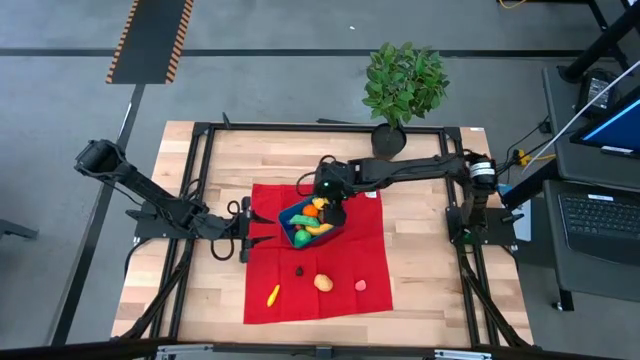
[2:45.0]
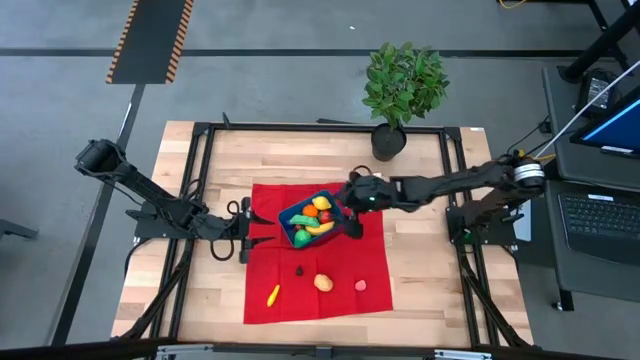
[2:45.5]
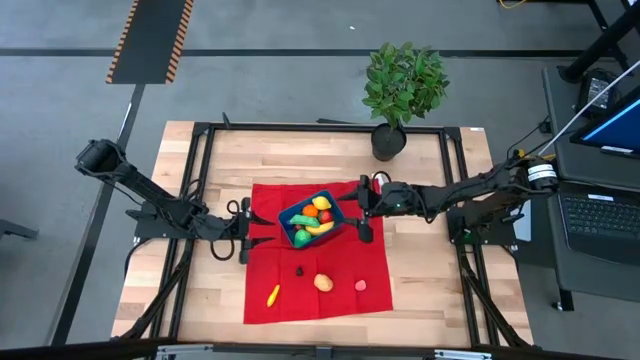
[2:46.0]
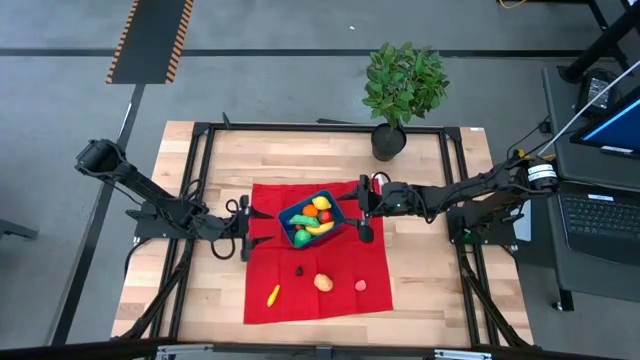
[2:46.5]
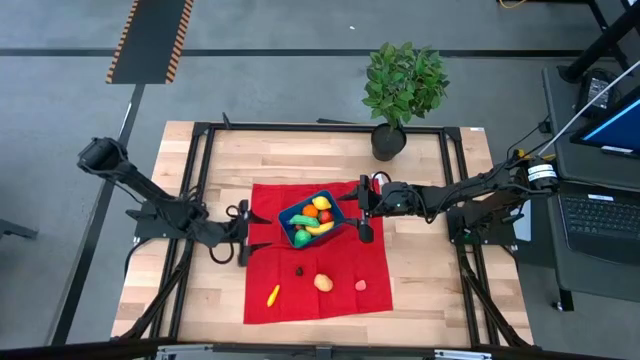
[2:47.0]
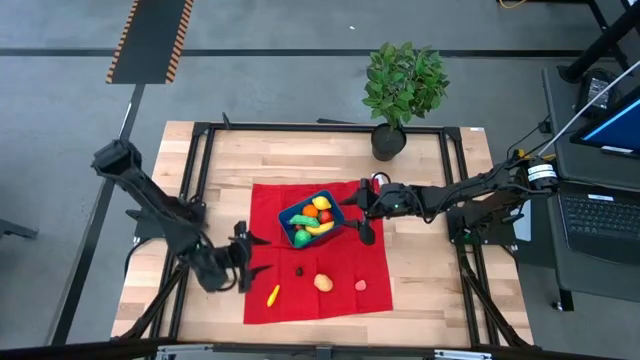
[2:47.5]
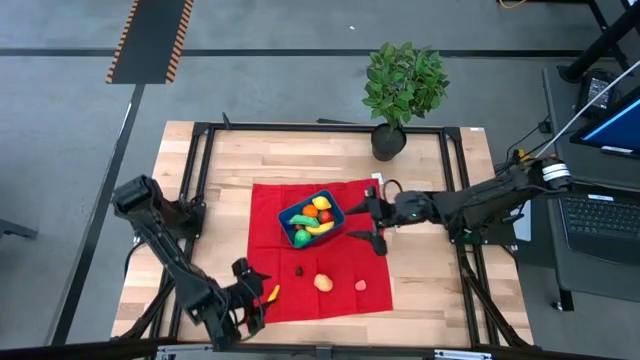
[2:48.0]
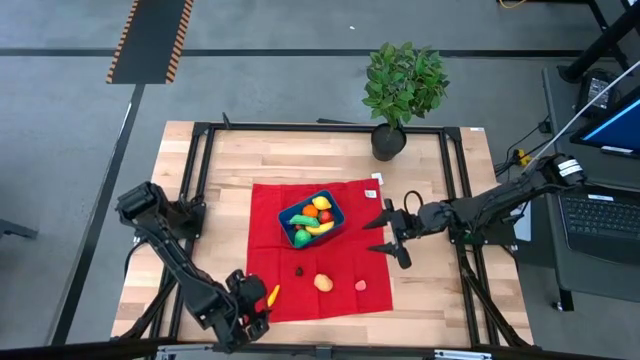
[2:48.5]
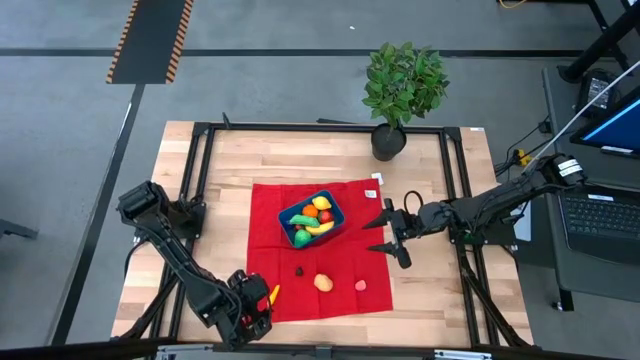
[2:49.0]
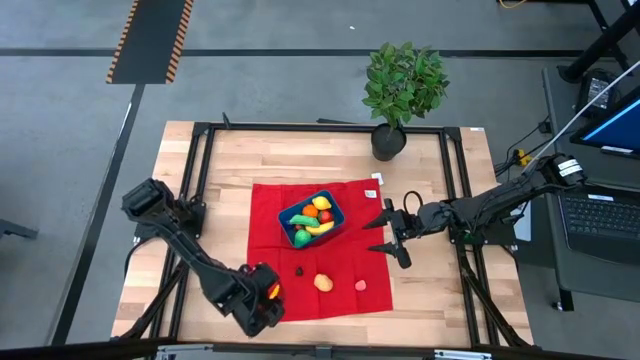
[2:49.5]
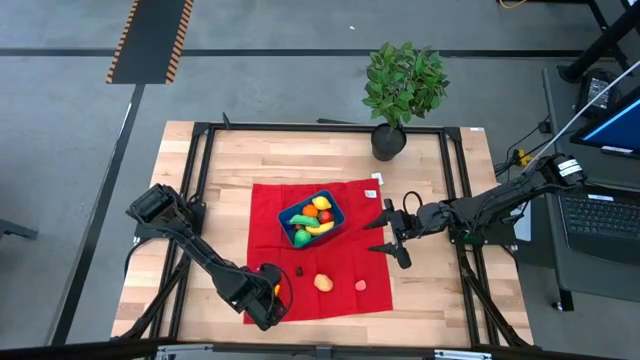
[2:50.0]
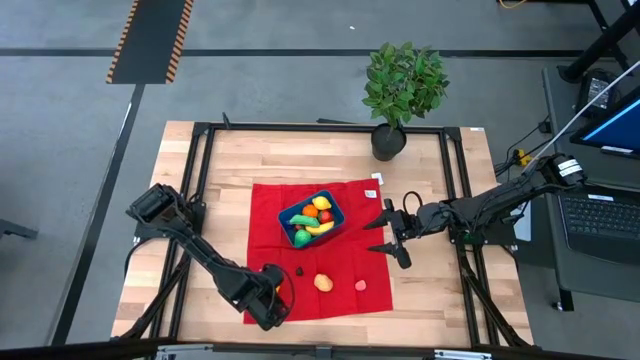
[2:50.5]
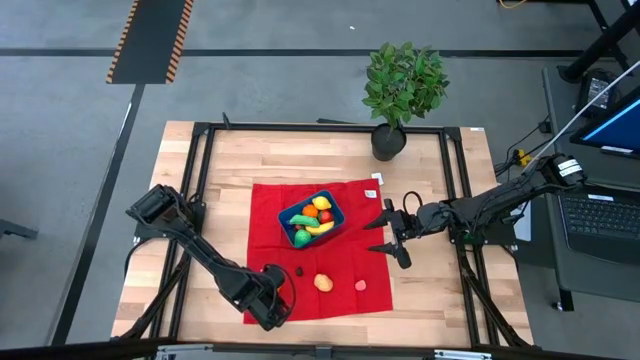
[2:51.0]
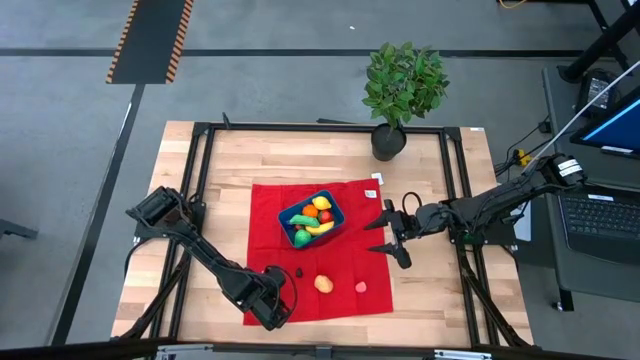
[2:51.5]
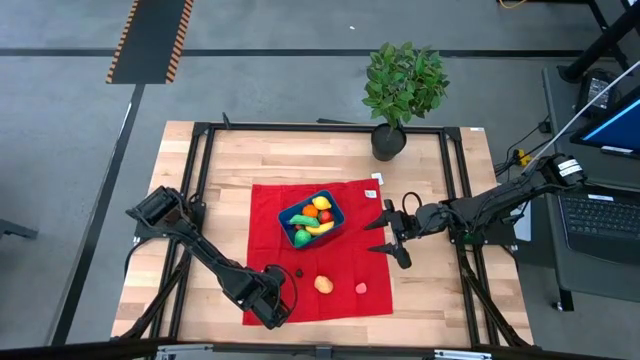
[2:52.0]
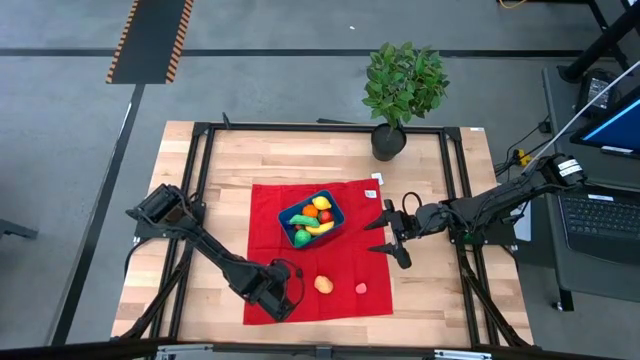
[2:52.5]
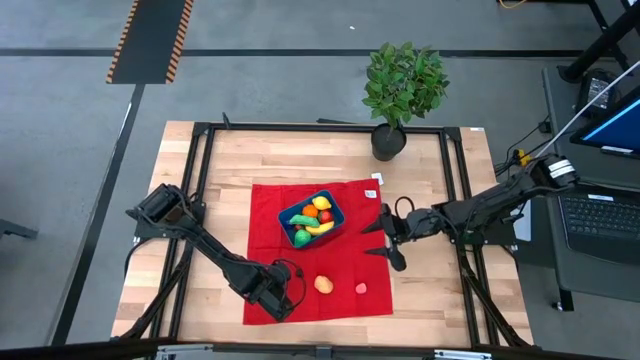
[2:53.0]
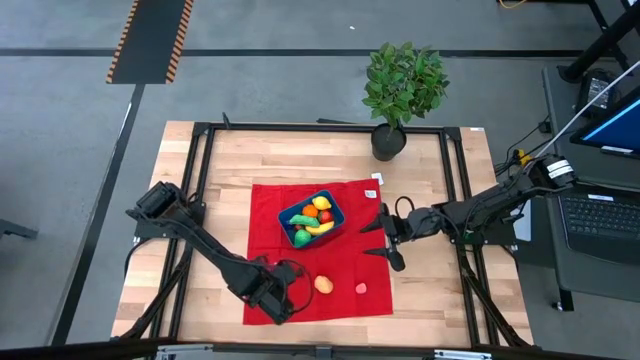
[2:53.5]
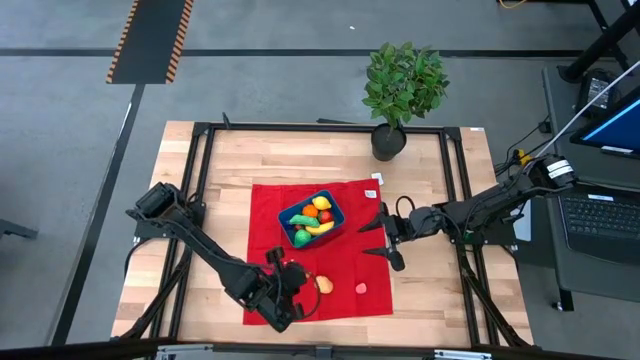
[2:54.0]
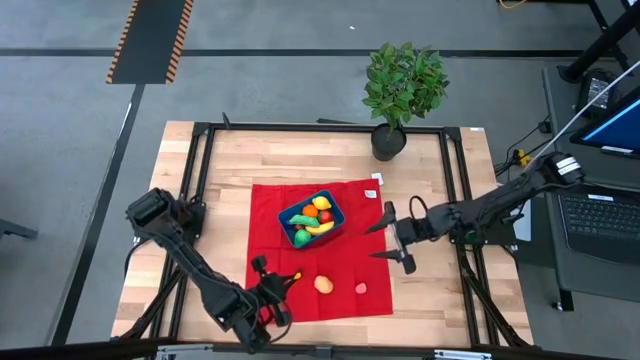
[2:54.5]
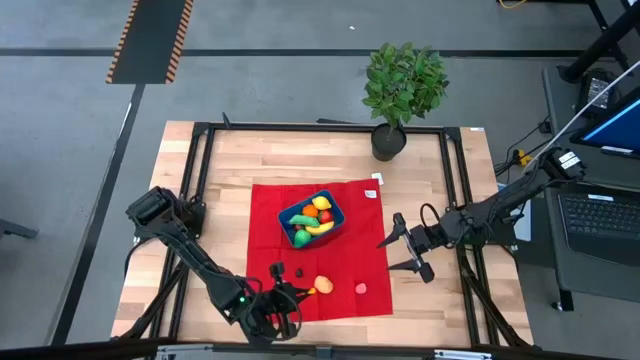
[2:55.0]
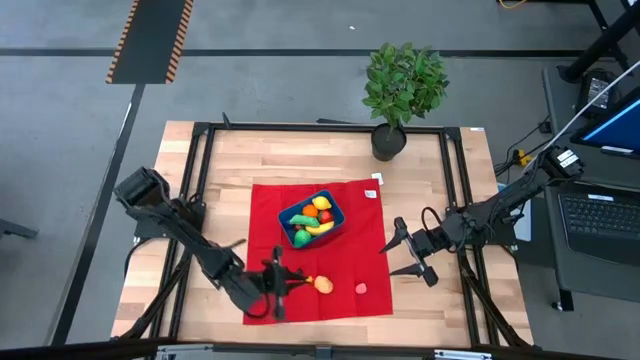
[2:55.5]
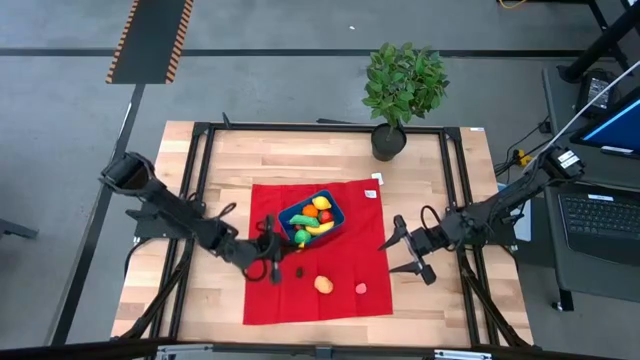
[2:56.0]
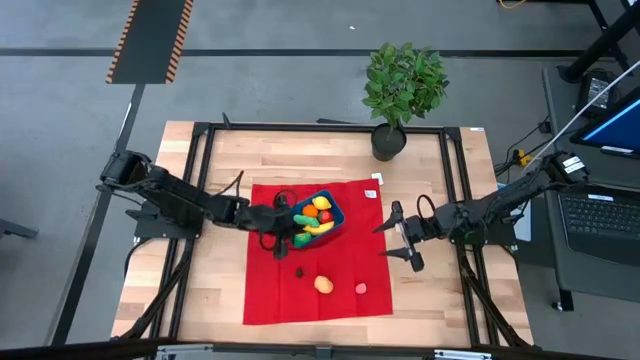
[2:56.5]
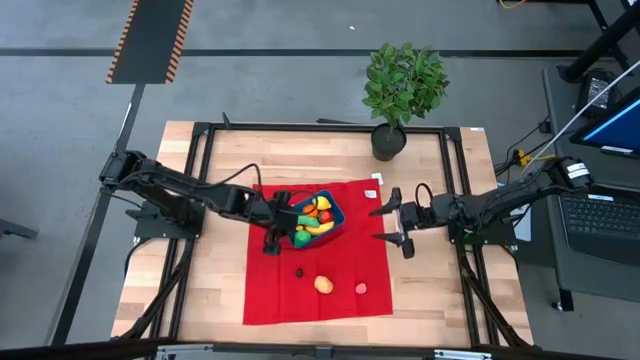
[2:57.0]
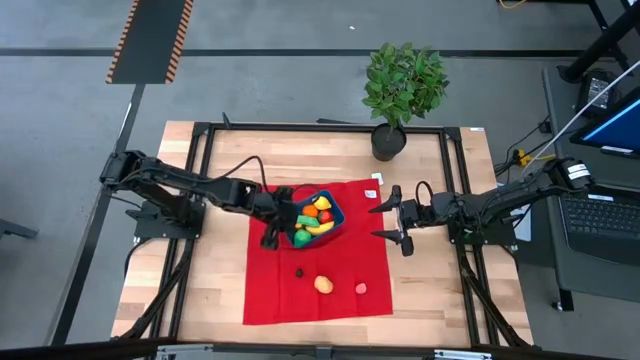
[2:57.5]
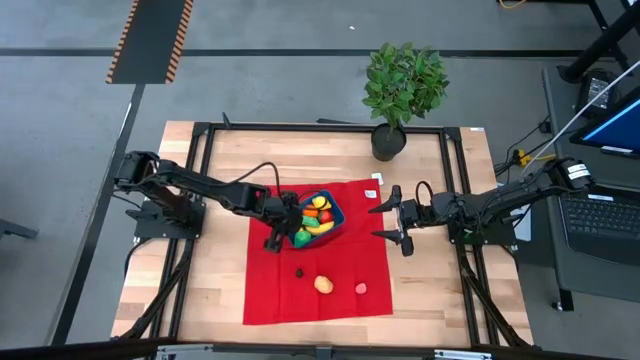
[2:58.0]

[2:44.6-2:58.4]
Task: Pick and placing Produce into tupperware
Put the corn into the blue bin

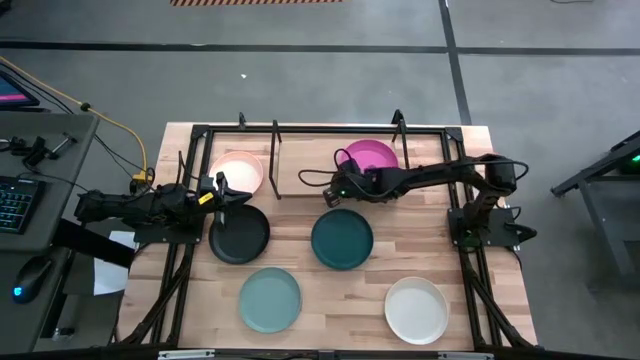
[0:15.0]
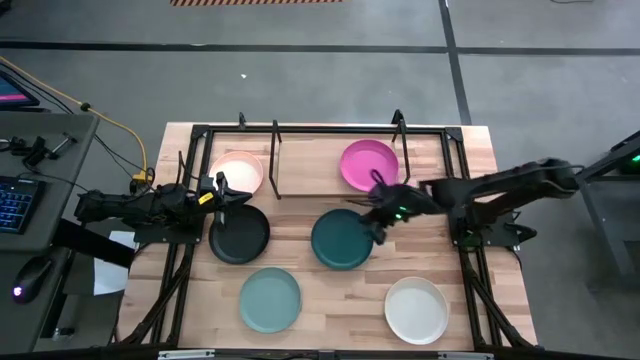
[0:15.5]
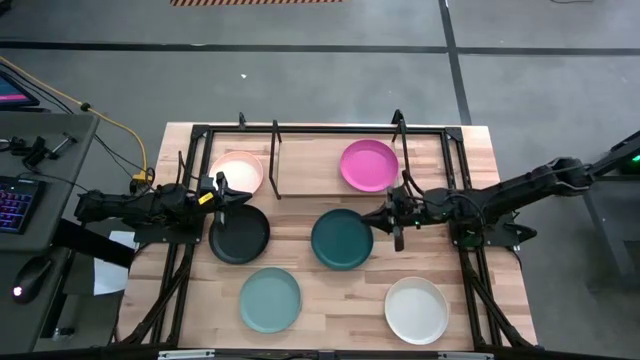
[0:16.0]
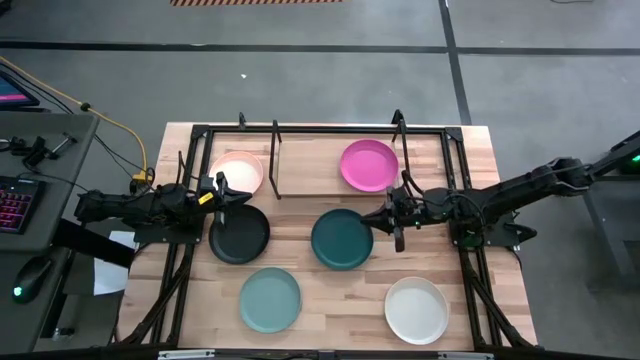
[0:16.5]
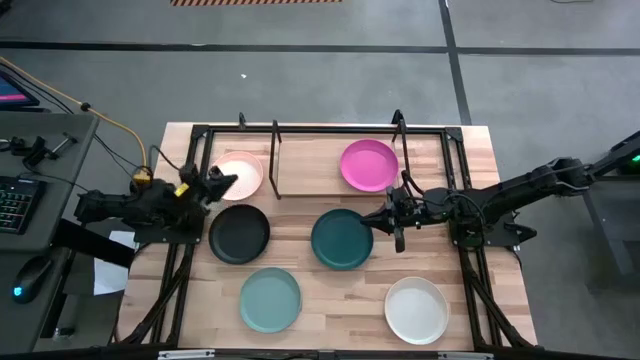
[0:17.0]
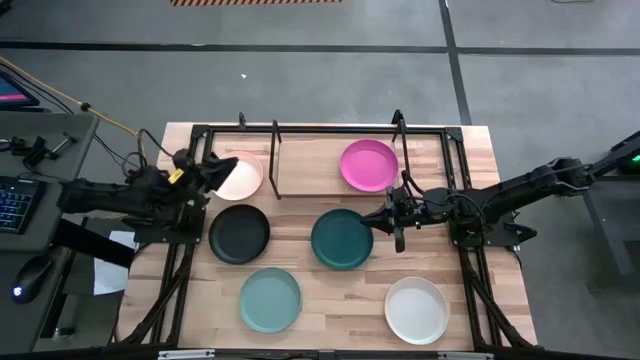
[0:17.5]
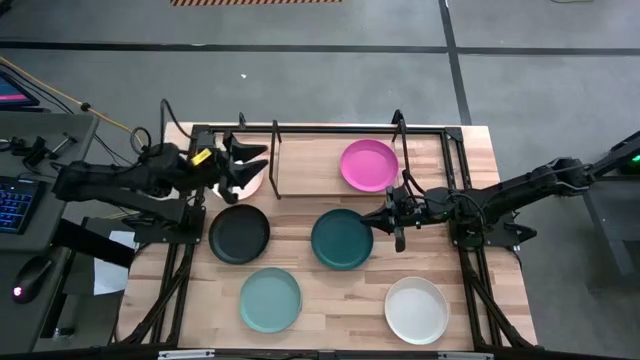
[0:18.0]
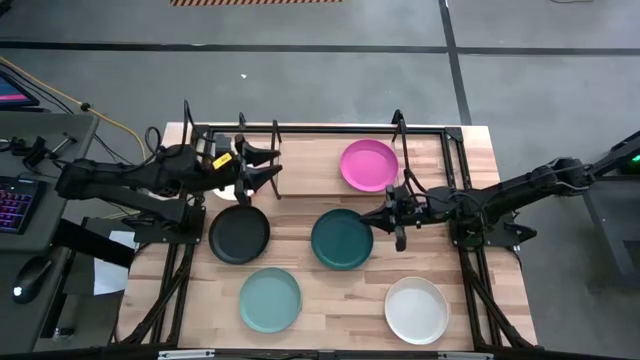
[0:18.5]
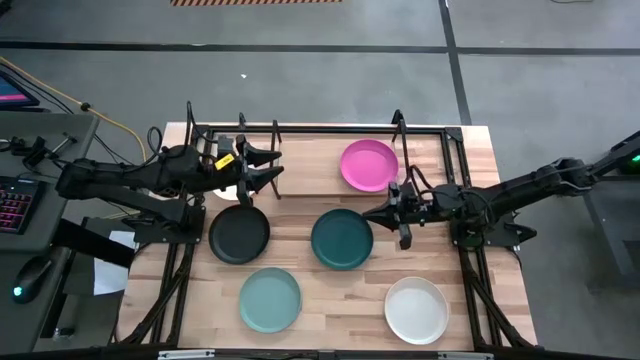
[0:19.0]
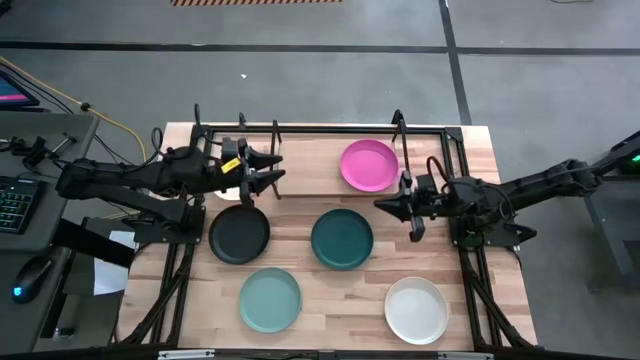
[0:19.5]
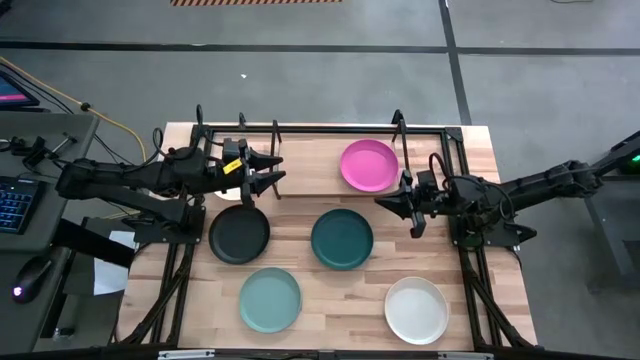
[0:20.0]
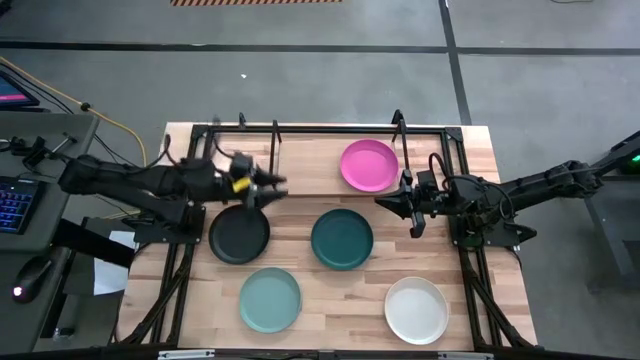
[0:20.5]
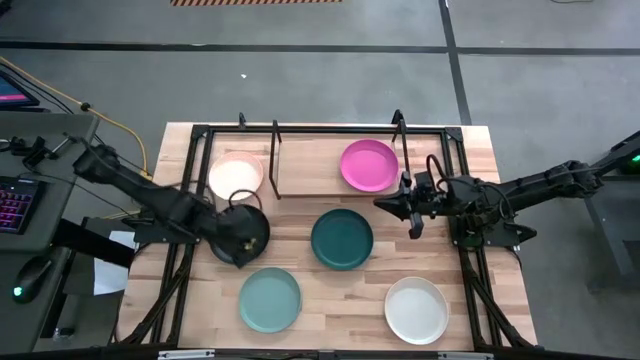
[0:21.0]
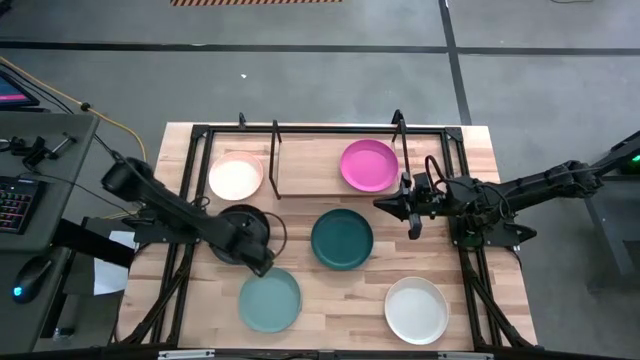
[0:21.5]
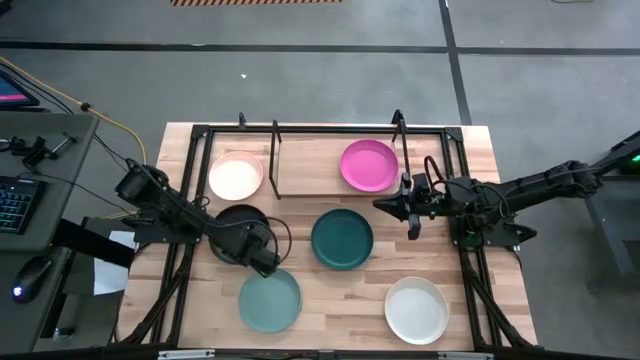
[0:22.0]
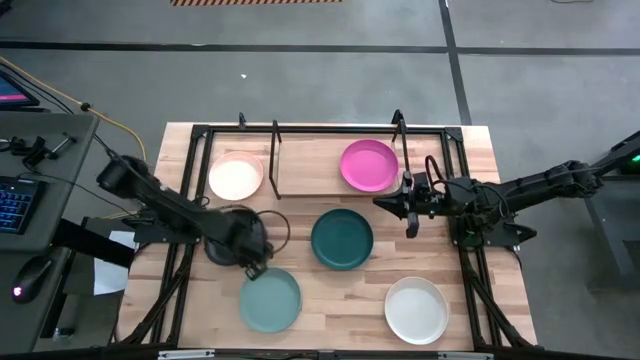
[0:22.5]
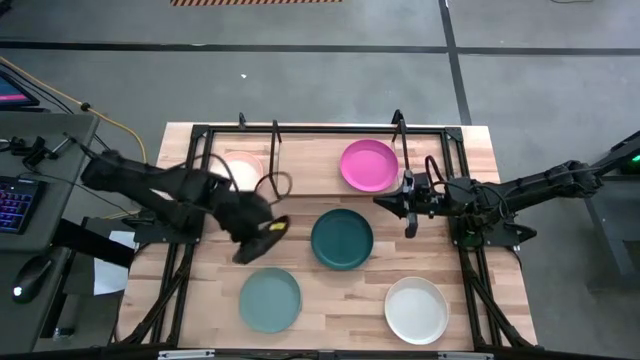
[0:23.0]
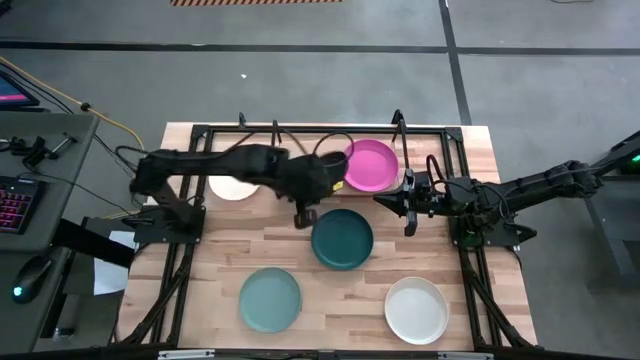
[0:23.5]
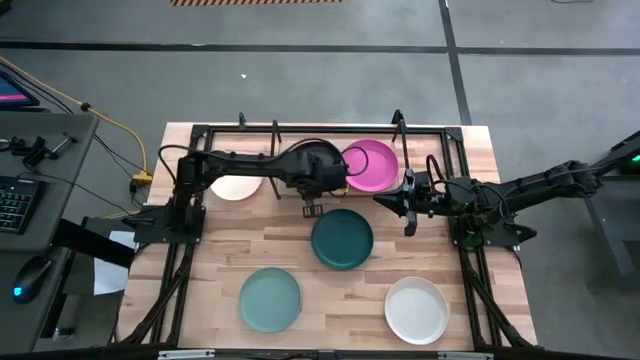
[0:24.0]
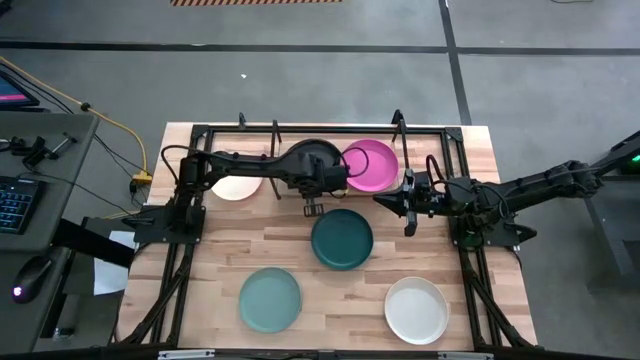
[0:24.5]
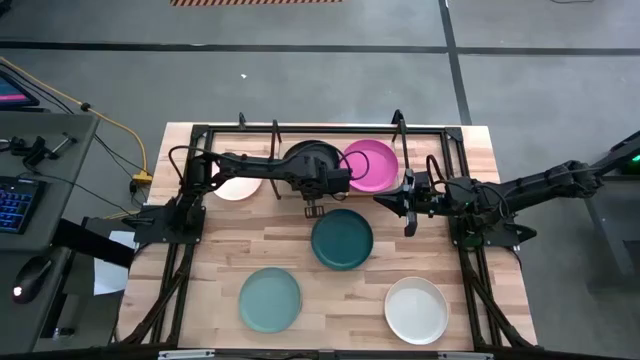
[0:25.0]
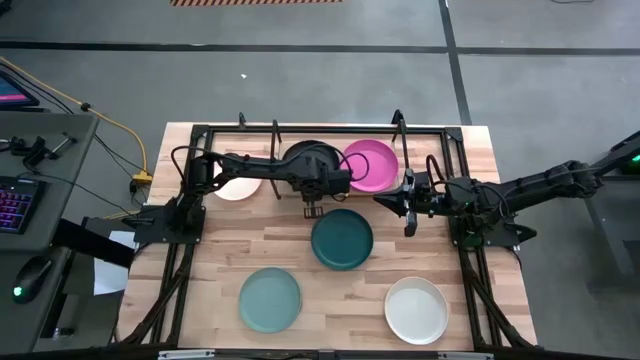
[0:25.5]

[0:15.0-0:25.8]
Task: Place and stack plates onto a shelf
Put the black plate on the shelf
